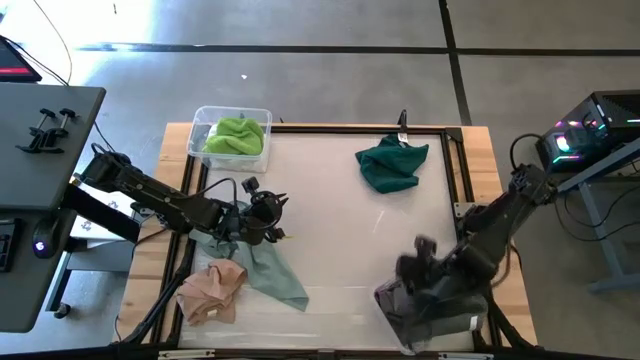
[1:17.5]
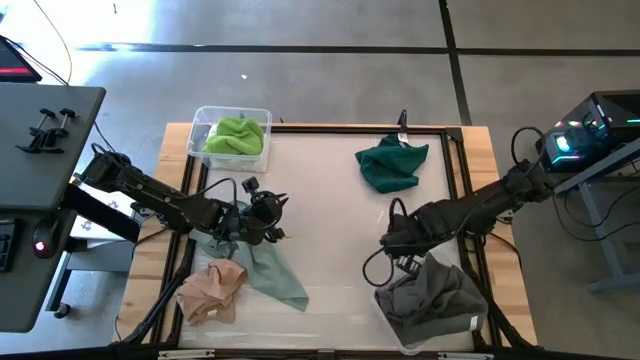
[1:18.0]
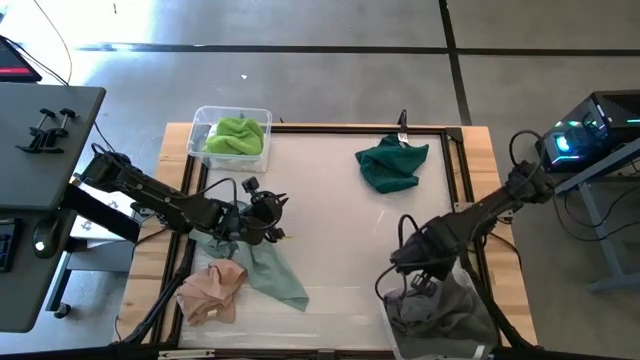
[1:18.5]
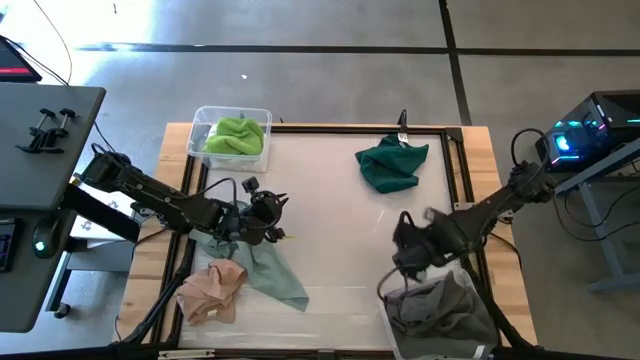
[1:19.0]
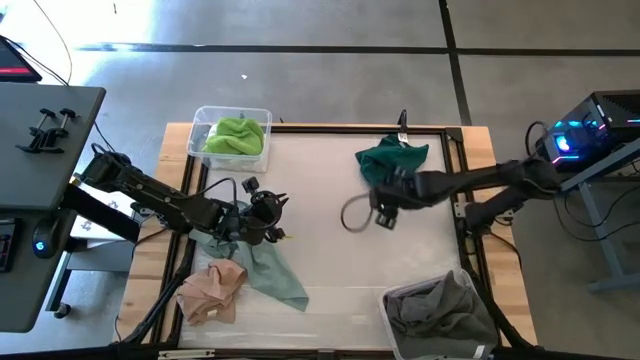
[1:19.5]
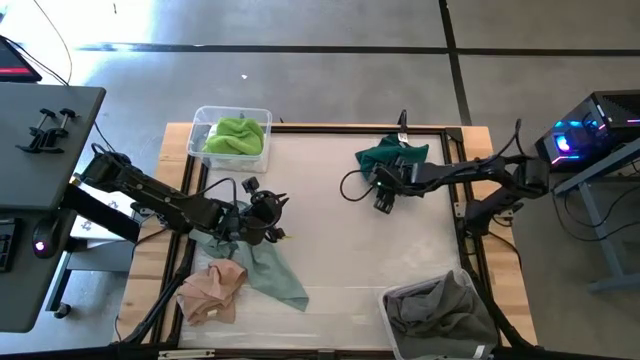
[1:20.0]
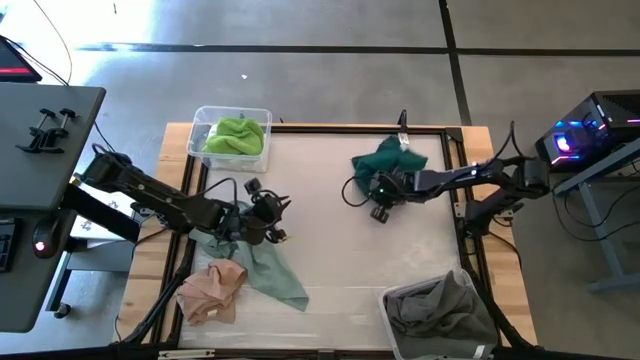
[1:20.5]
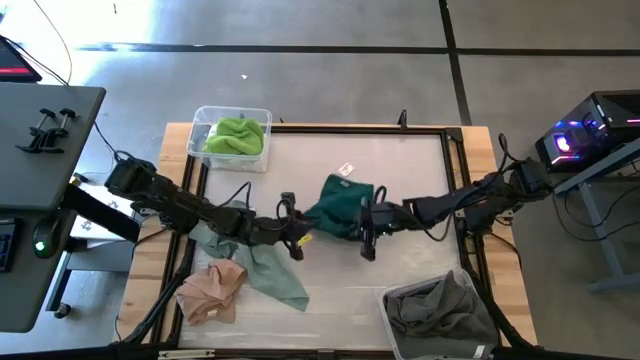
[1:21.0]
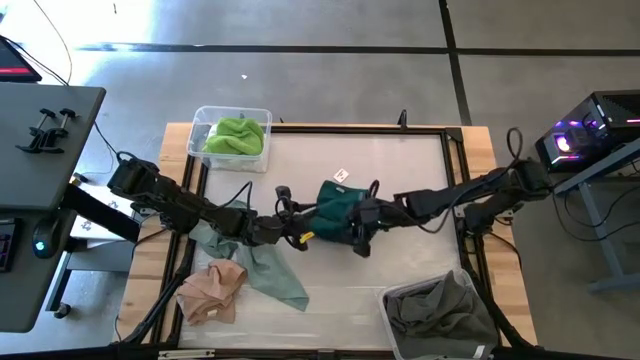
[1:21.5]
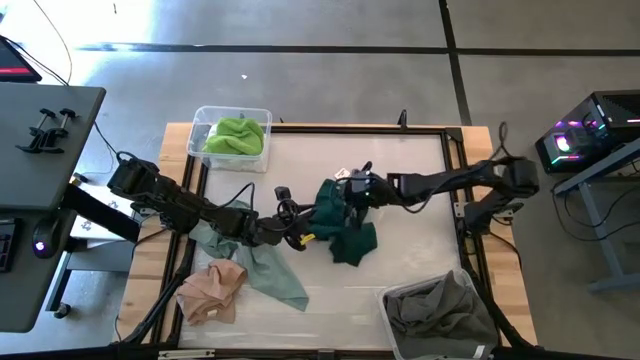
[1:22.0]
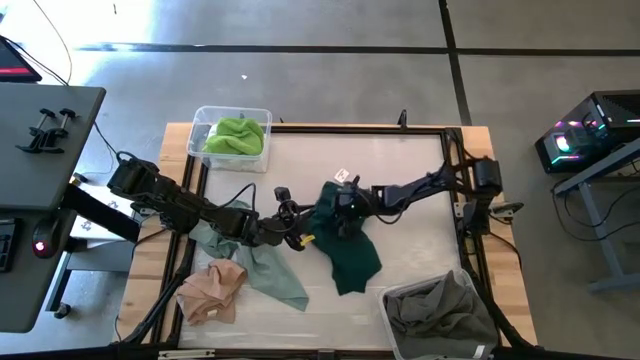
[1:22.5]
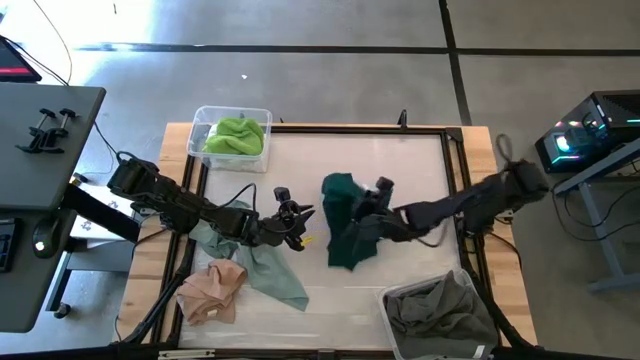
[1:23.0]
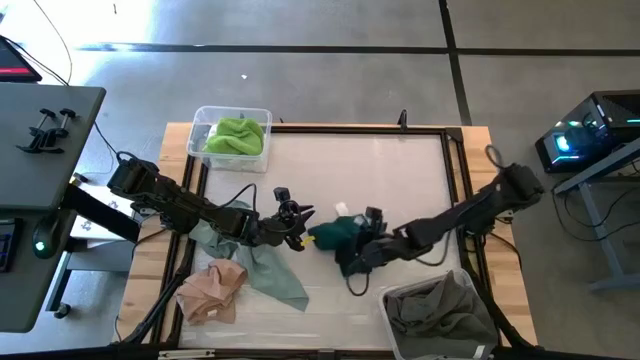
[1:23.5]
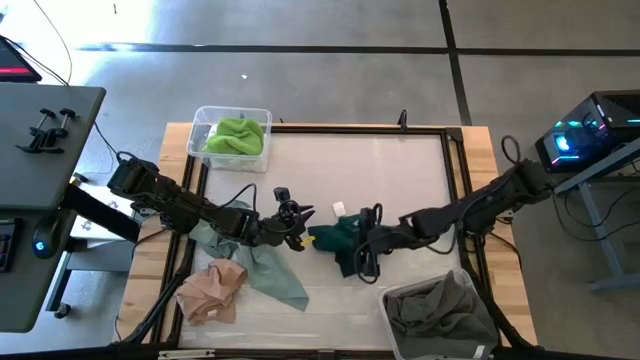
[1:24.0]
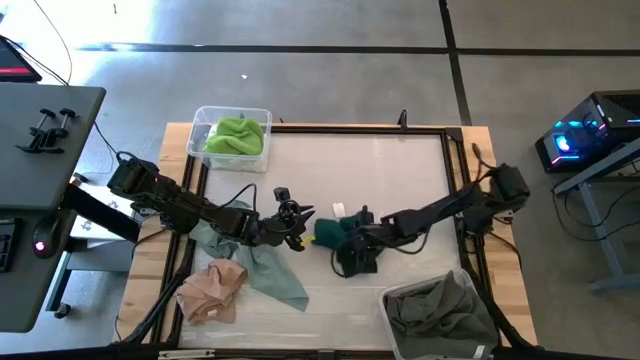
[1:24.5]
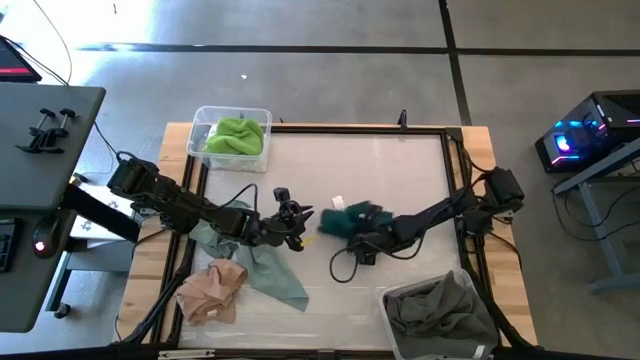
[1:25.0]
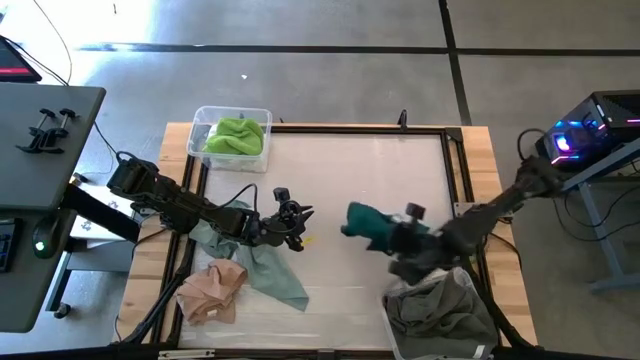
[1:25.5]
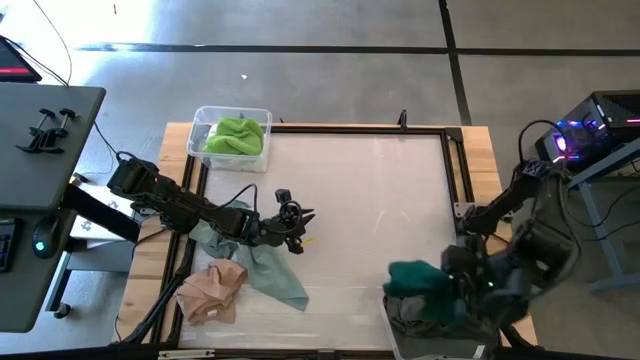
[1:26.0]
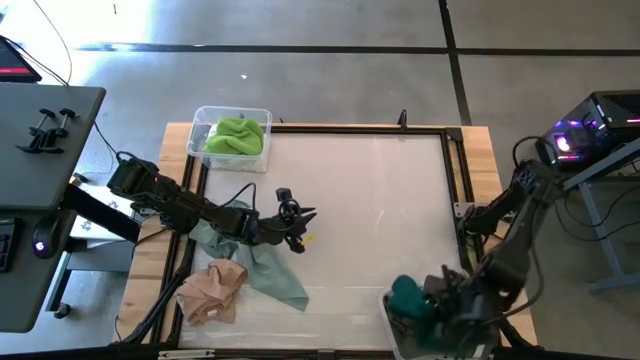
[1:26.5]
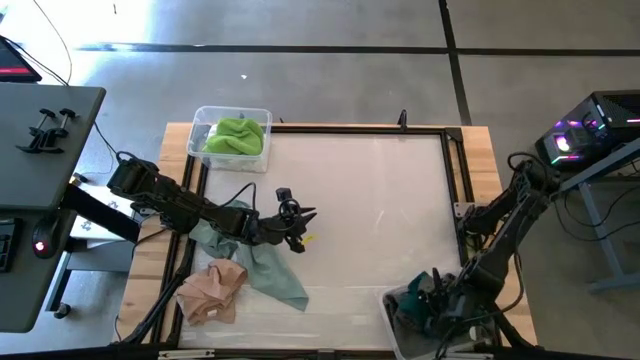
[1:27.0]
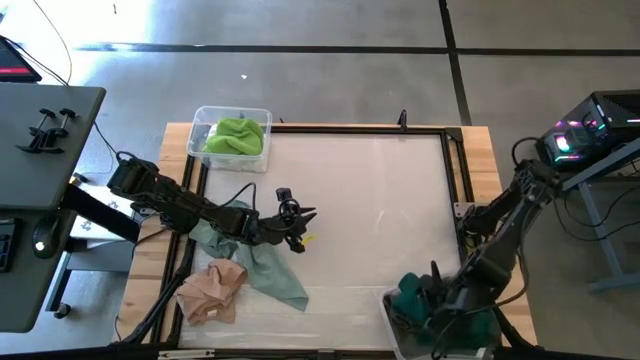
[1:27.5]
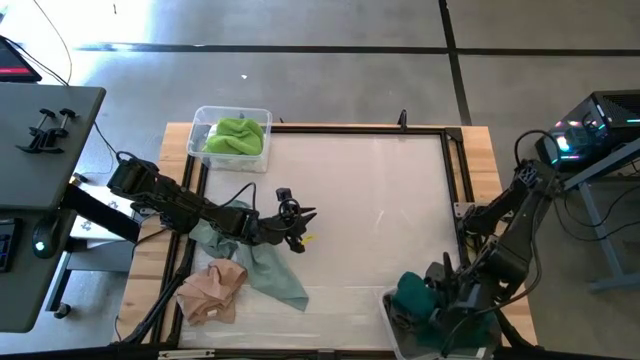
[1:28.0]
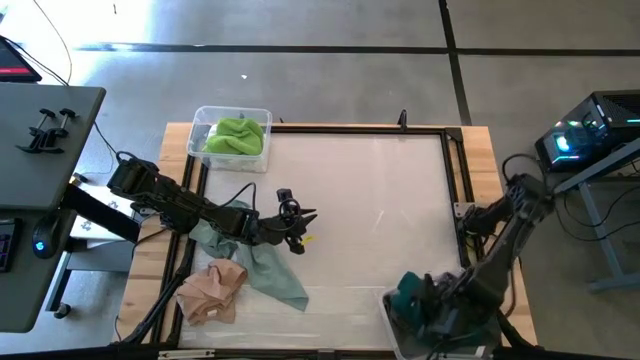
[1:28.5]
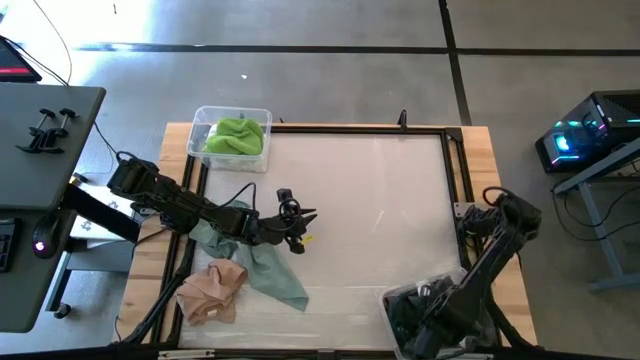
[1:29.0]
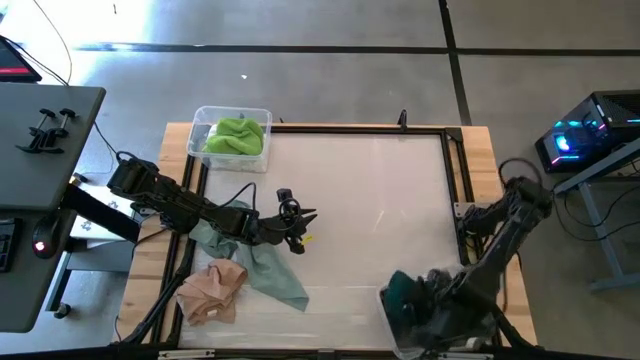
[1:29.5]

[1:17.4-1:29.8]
Task: Sort towels by color in basket
Put the dark green towel into the bottom transparent bin

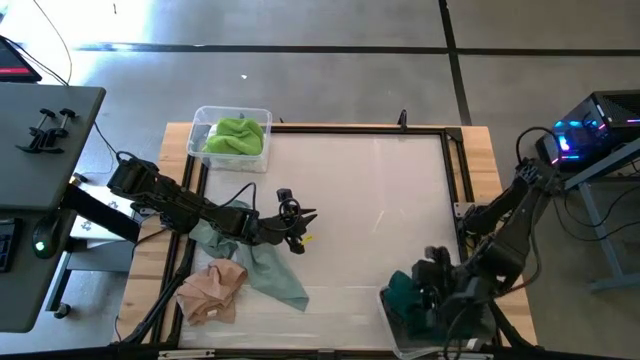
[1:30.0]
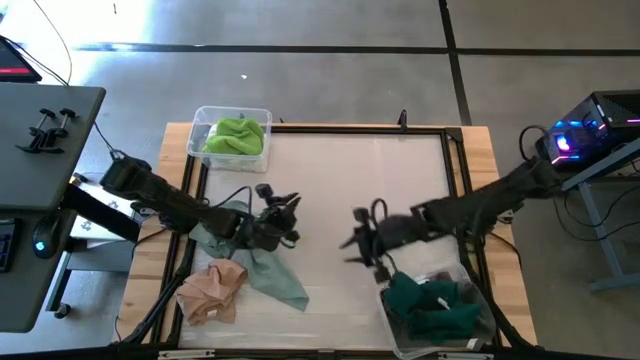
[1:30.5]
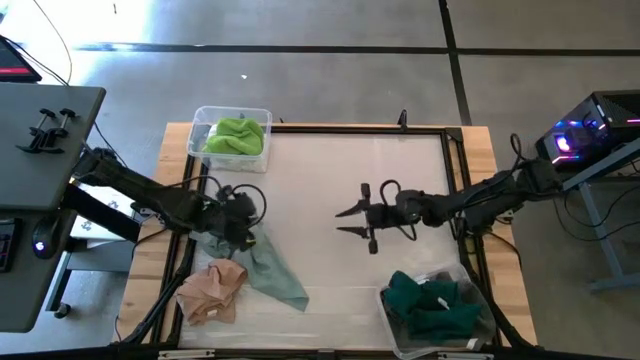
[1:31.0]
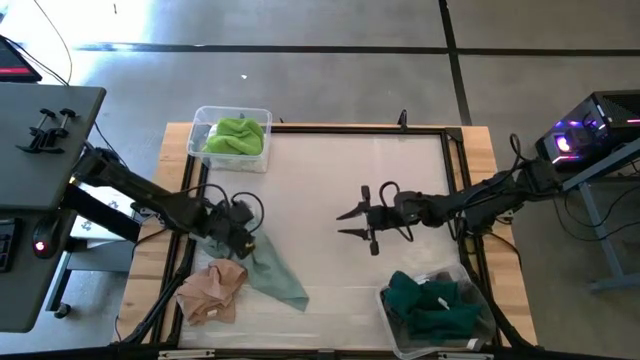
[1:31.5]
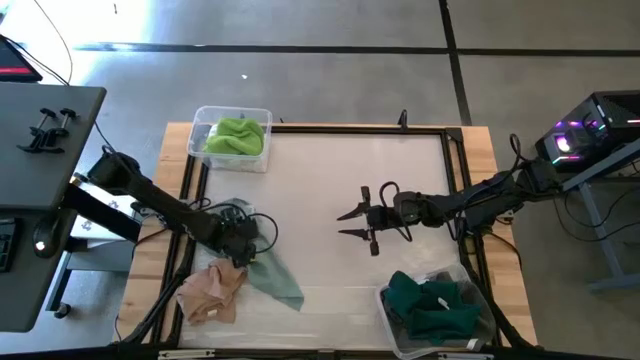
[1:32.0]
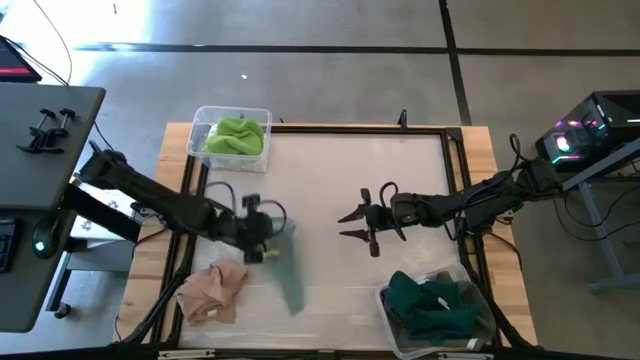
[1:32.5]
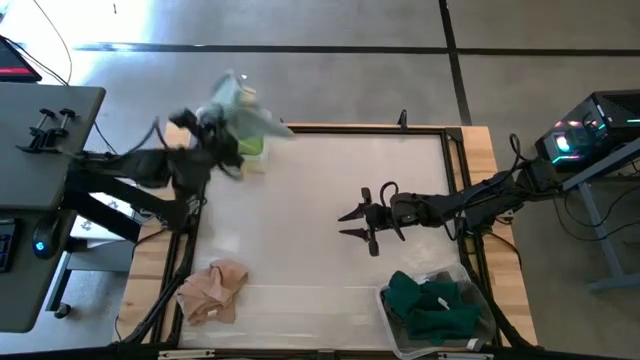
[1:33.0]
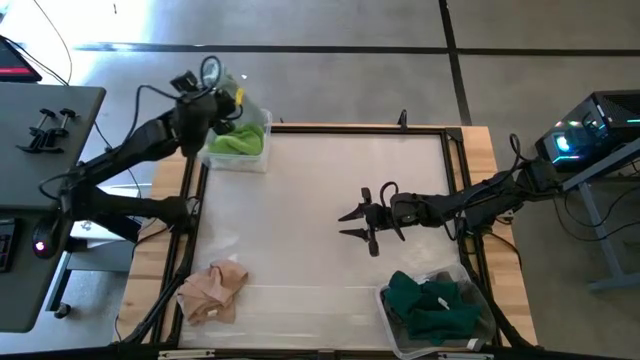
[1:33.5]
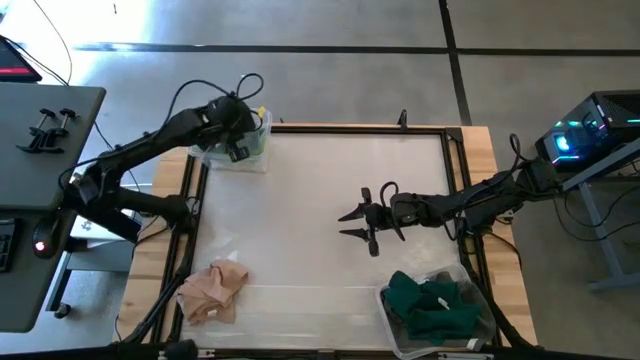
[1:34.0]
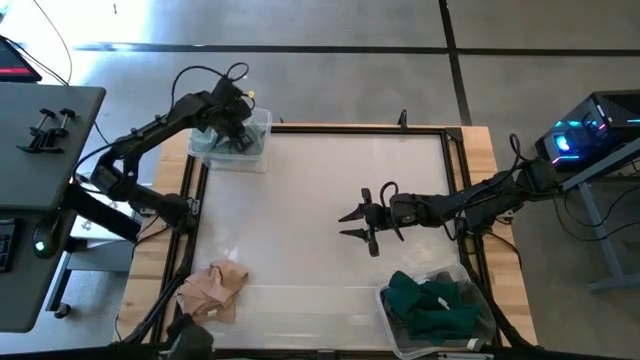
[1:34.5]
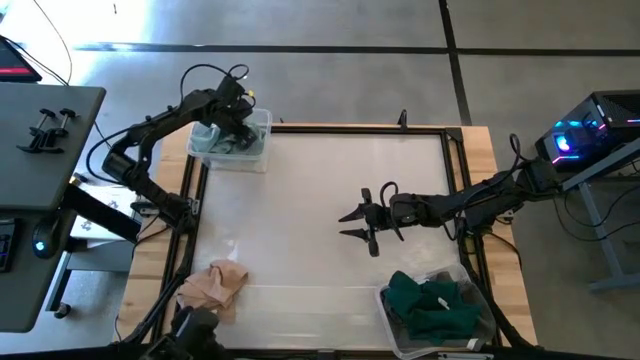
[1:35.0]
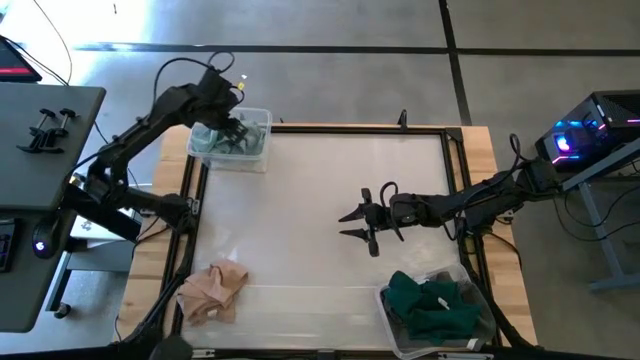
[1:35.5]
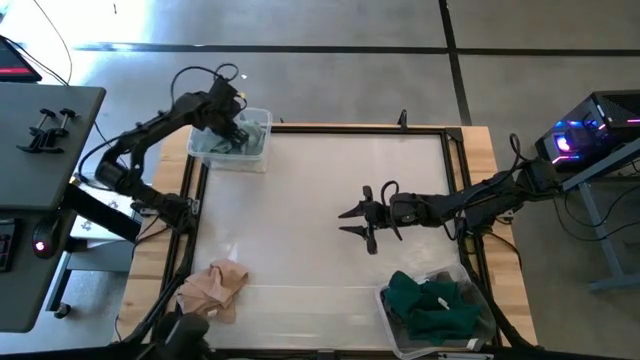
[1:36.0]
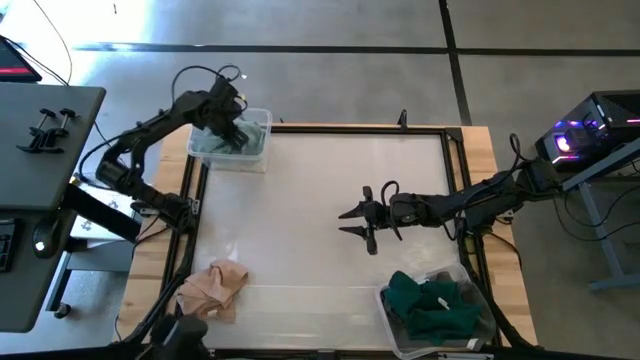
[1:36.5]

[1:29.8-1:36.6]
Put the light blue towel into the top transparent bin

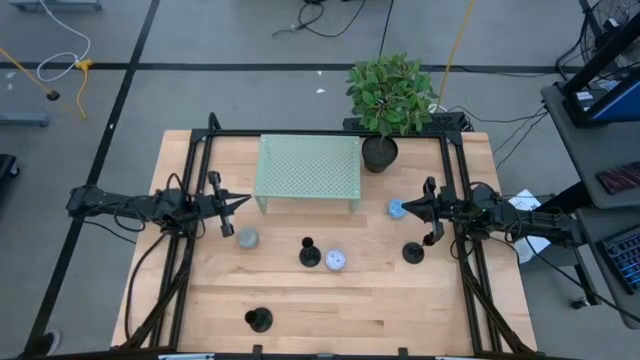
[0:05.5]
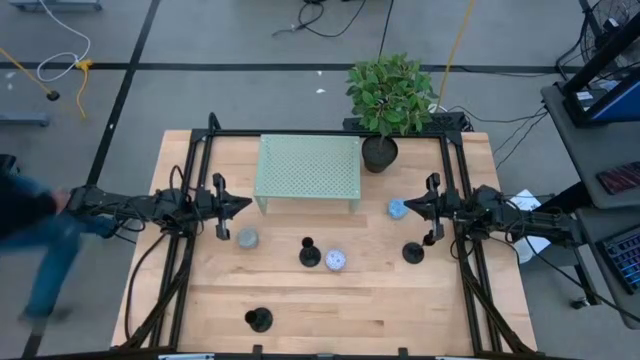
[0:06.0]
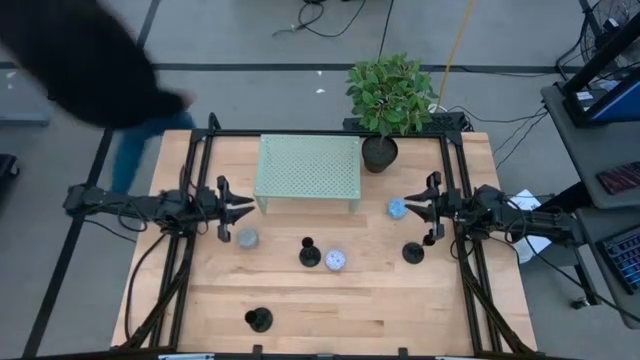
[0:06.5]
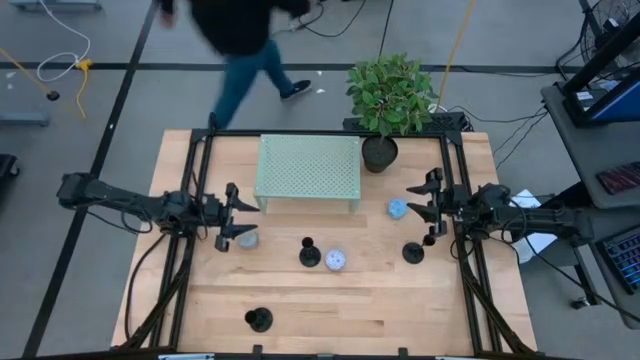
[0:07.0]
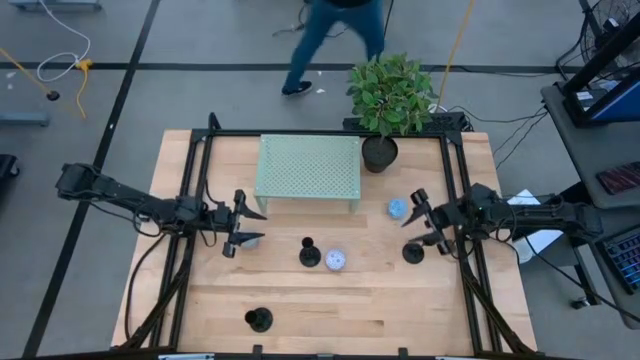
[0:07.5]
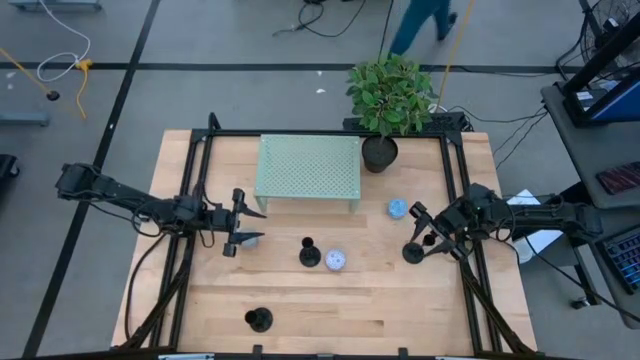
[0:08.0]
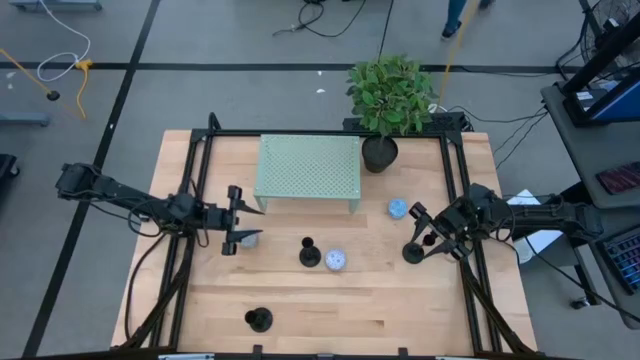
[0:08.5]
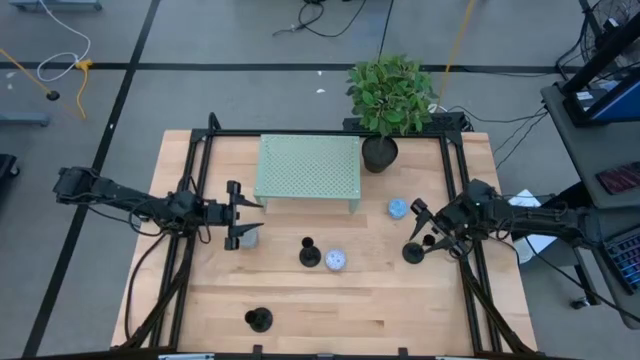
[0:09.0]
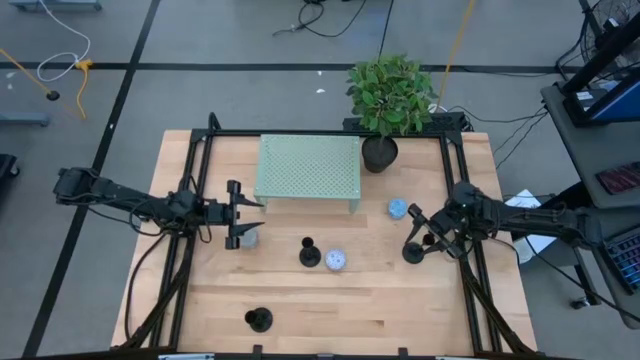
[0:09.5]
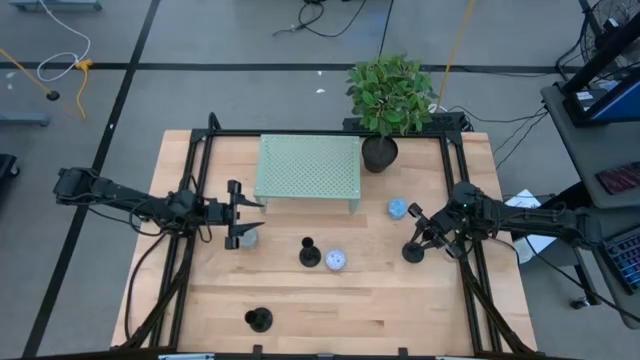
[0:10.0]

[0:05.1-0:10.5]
Task: Pick & Place candle stick holders
Put the black candle holder on the shelf
